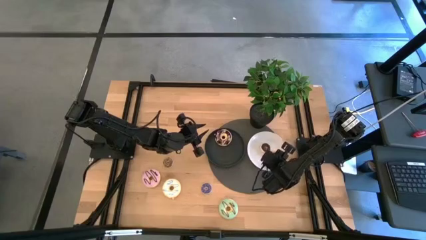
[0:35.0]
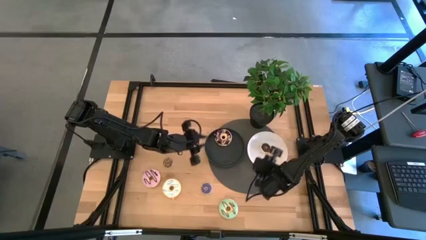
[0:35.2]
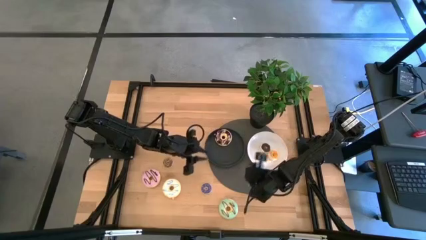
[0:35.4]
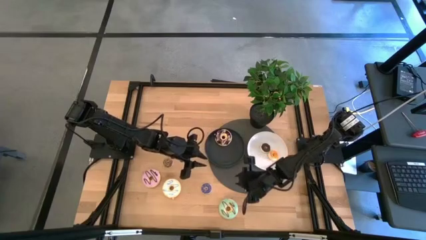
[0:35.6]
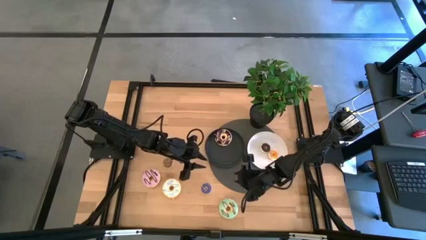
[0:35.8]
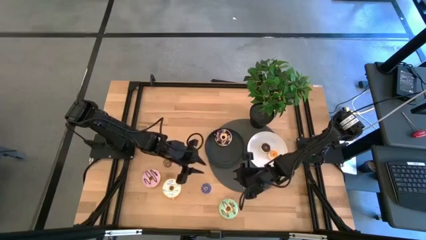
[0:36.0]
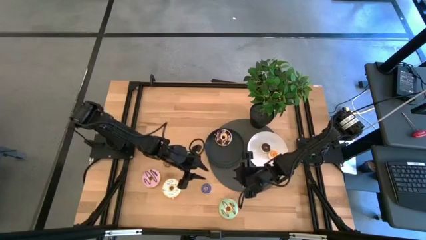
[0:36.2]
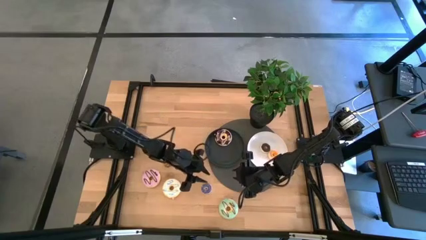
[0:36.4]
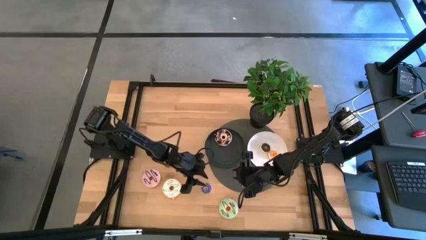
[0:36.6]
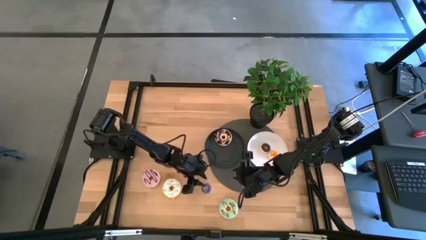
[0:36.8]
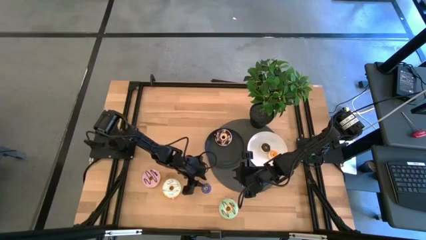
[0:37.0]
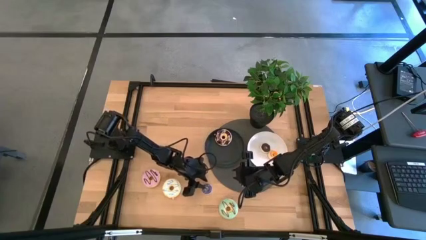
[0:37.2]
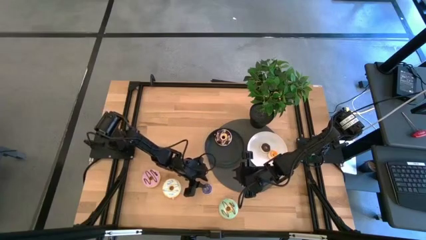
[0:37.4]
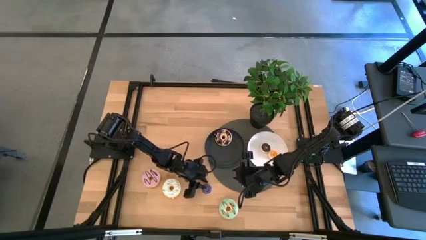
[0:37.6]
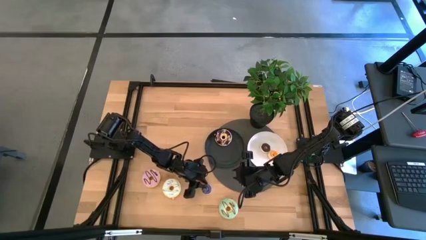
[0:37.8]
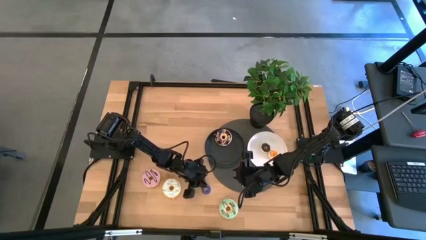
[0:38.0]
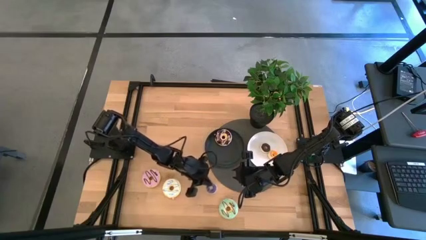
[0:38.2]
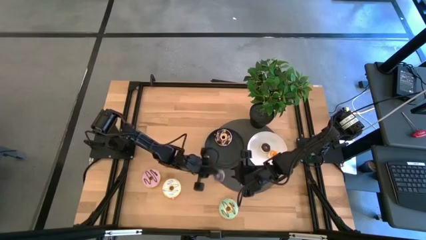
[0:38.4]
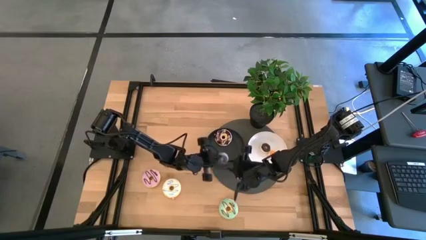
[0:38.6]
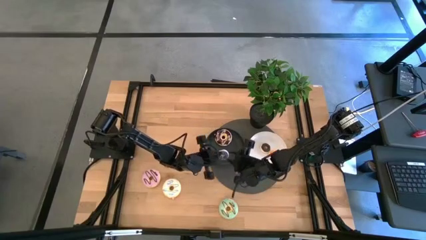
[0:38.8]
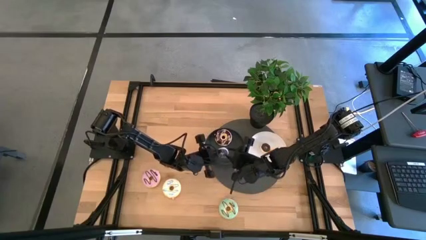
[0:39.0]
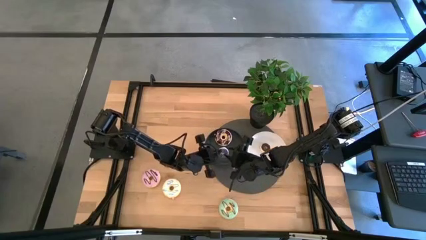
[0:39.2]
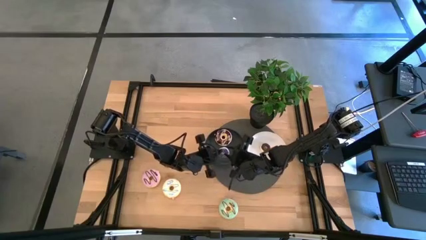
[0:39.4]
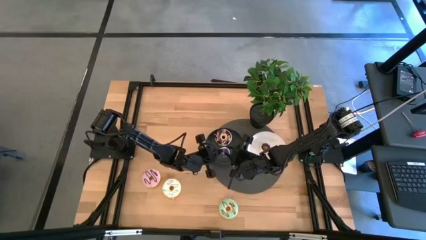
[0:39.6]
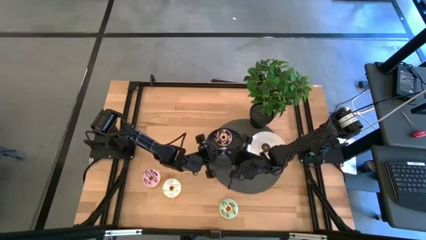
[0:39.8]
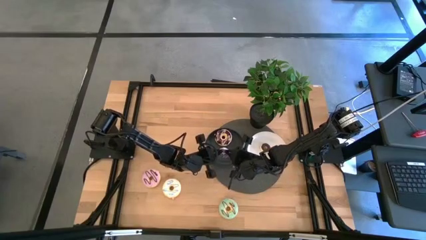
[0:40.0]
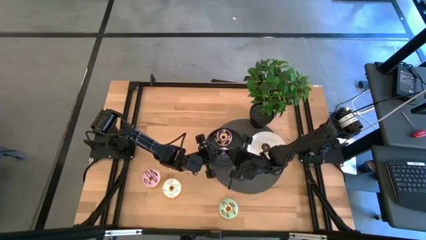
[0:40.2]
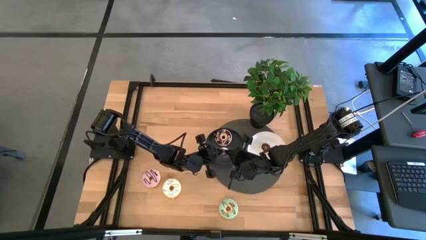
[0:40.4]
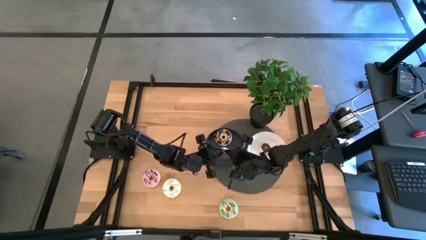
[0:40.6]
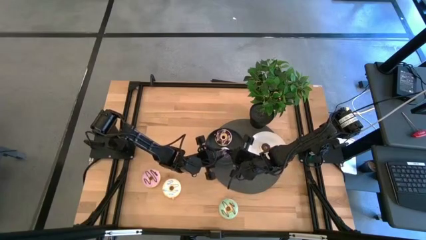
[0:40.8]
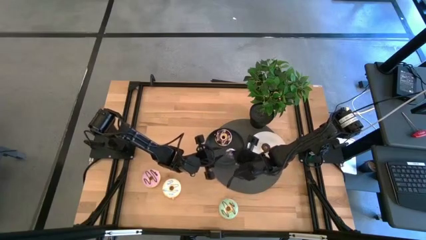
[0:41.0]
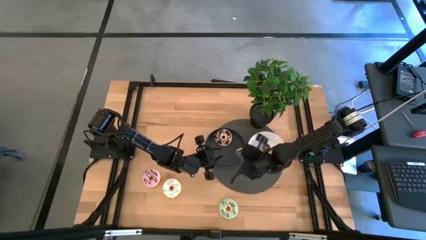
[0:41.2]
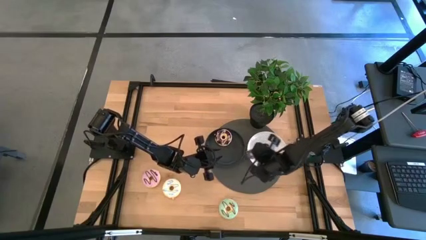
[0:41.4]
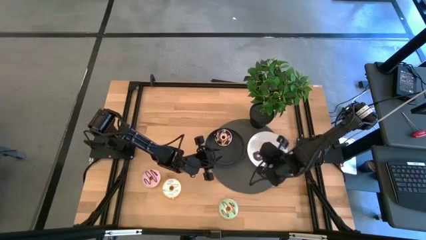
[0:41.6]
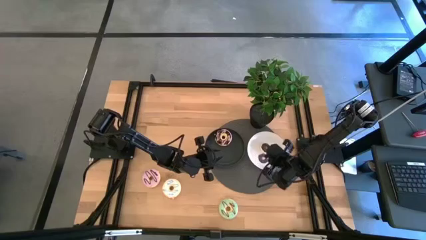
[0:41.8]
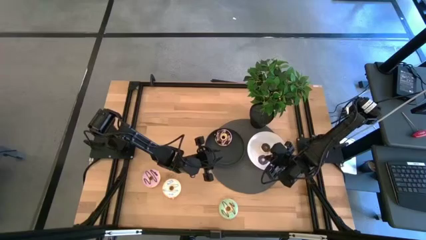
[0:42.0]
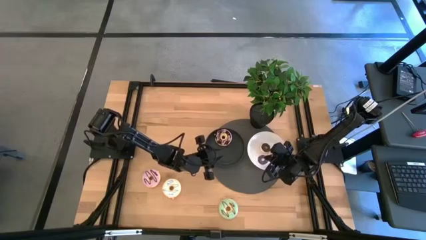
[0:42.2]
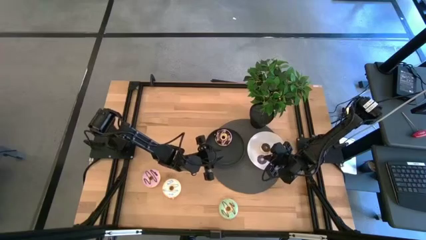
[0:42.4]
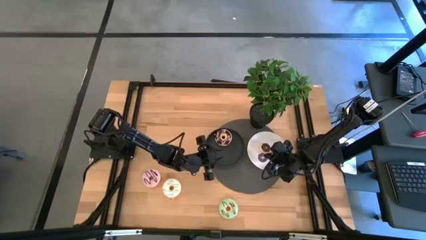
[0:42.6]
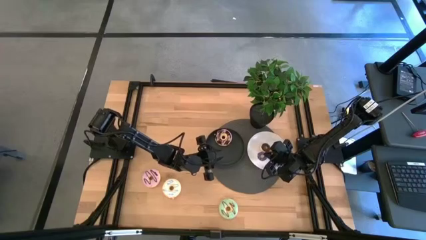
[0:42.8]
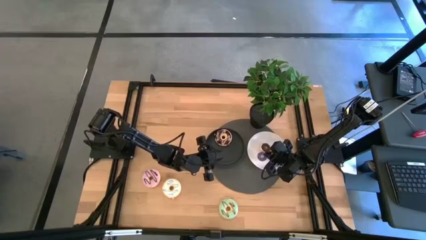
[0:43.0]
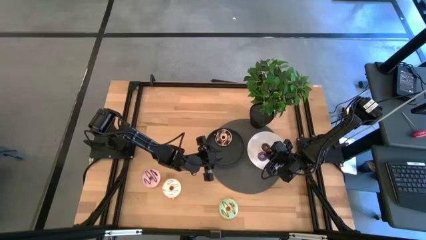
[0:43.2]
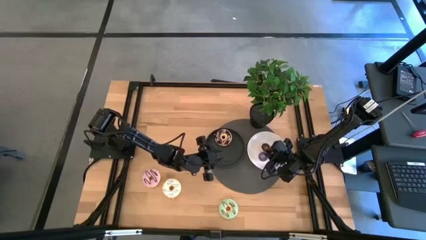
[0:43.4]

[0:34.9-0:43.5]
Task: Pick & Place donuts
Put the small violet donut on the white plate

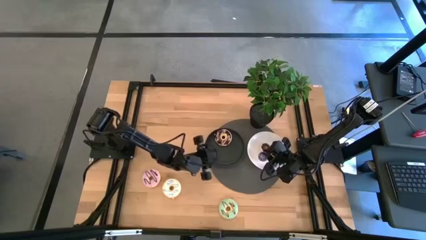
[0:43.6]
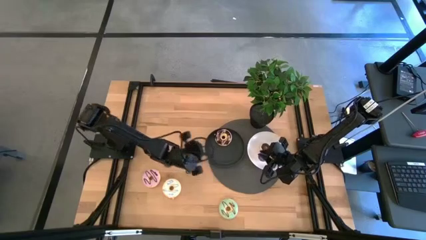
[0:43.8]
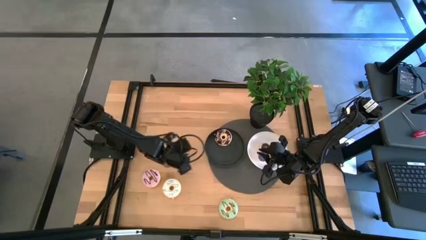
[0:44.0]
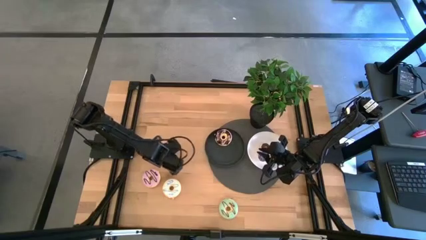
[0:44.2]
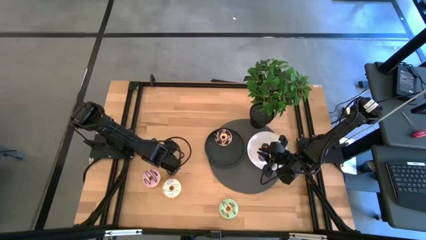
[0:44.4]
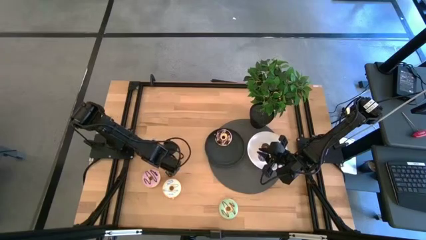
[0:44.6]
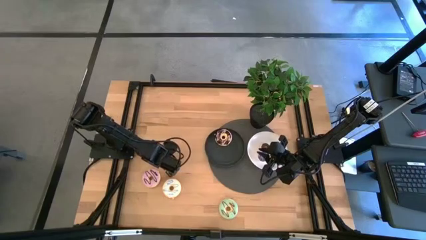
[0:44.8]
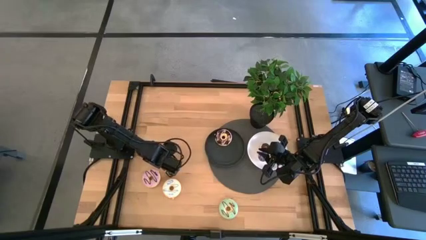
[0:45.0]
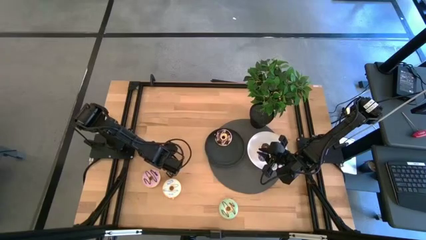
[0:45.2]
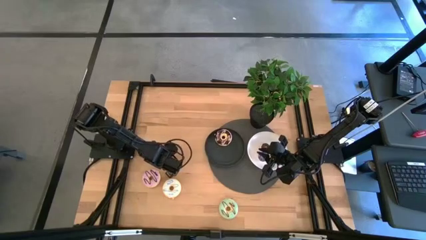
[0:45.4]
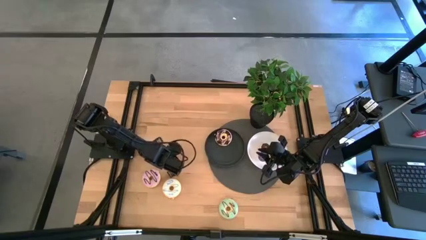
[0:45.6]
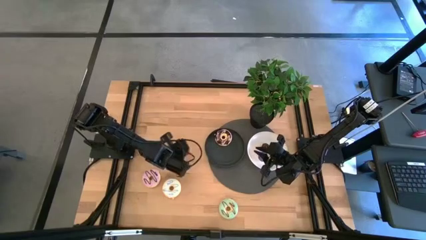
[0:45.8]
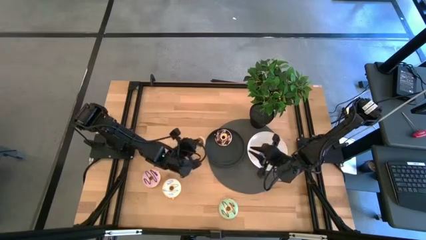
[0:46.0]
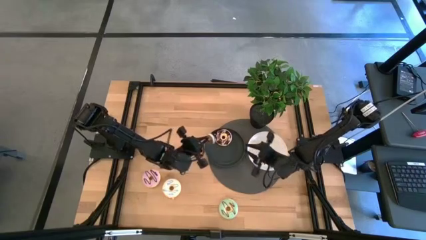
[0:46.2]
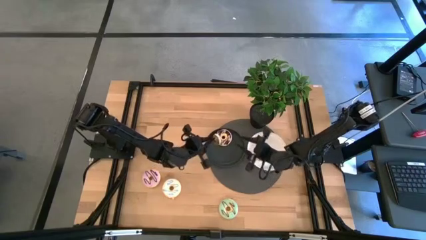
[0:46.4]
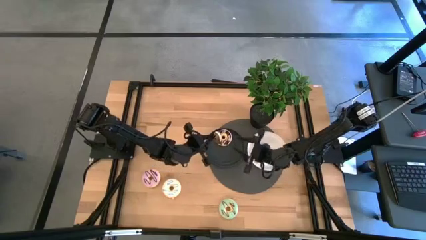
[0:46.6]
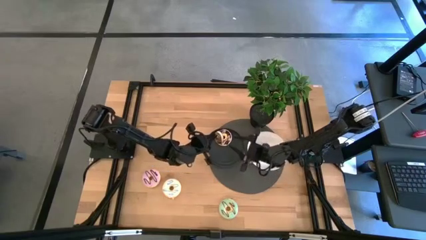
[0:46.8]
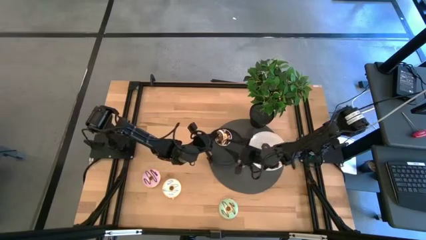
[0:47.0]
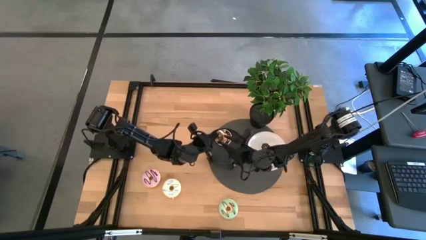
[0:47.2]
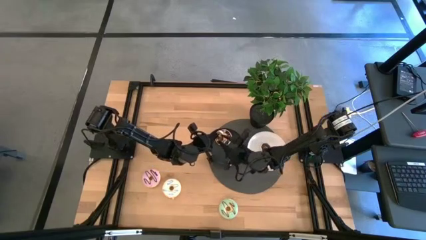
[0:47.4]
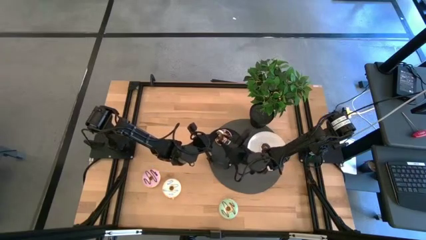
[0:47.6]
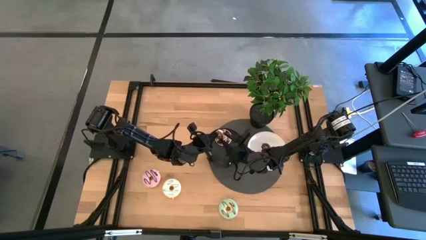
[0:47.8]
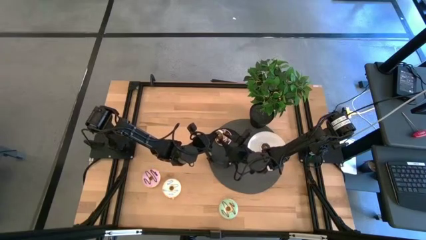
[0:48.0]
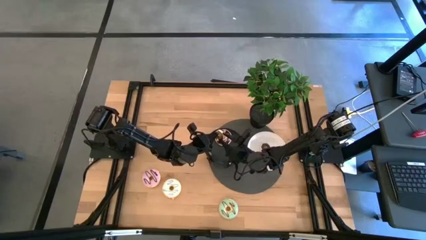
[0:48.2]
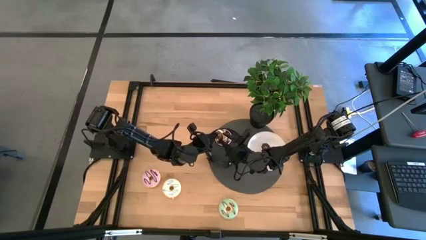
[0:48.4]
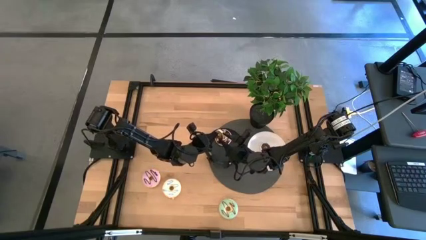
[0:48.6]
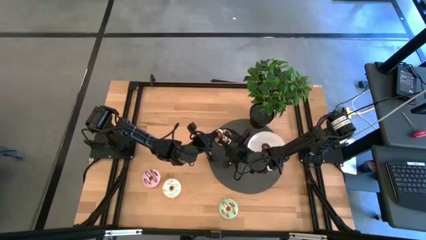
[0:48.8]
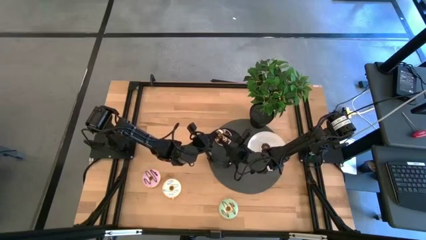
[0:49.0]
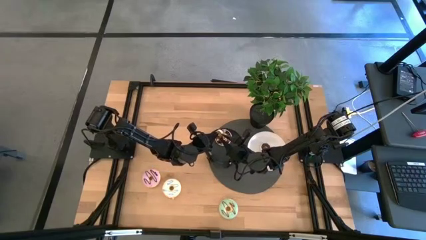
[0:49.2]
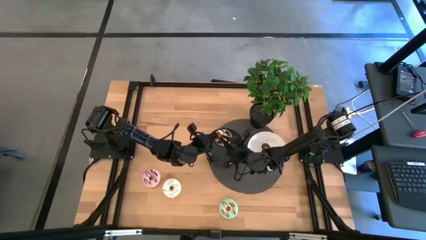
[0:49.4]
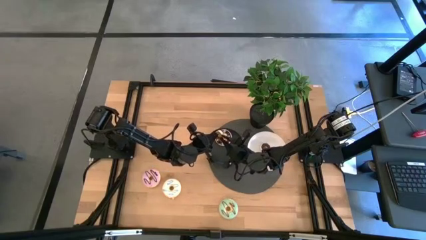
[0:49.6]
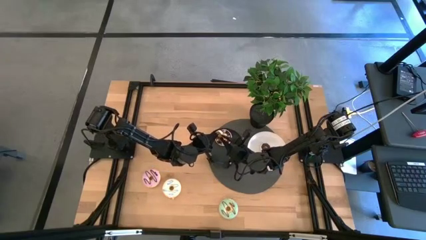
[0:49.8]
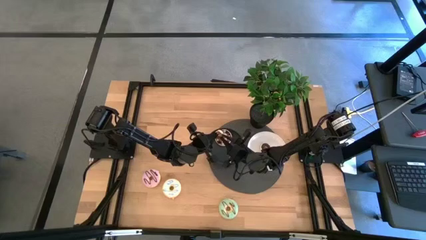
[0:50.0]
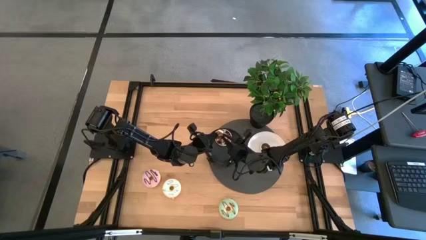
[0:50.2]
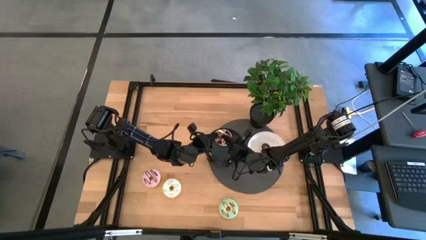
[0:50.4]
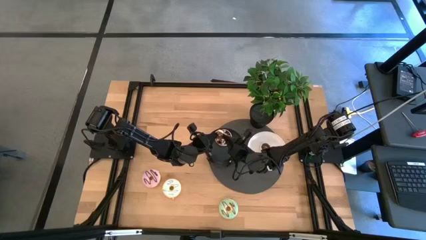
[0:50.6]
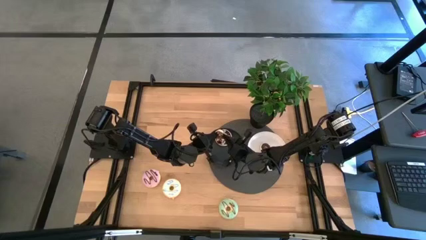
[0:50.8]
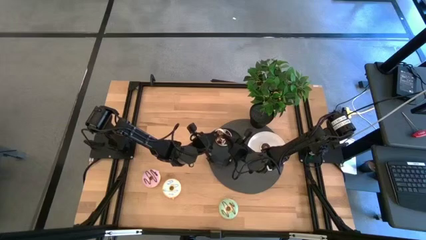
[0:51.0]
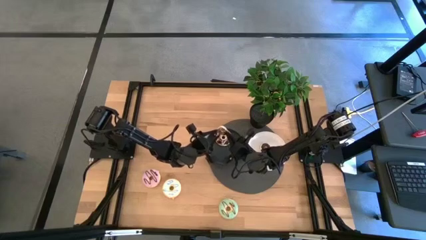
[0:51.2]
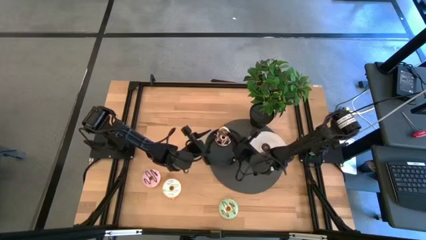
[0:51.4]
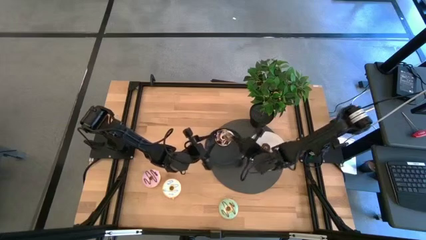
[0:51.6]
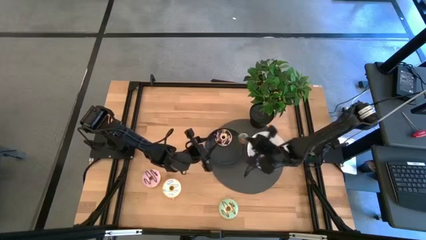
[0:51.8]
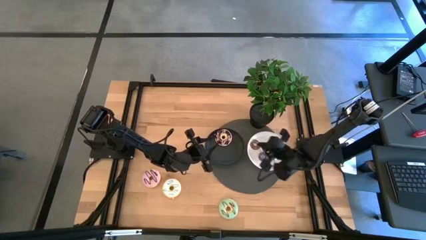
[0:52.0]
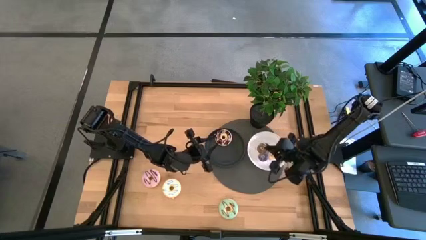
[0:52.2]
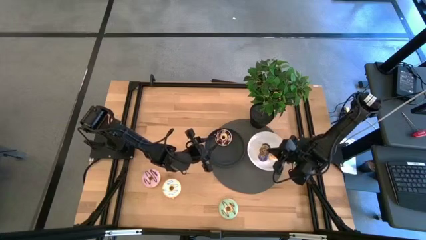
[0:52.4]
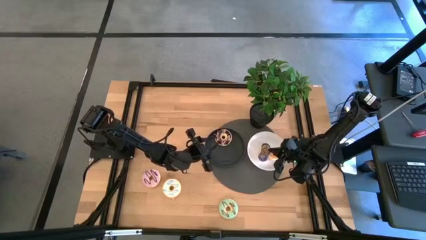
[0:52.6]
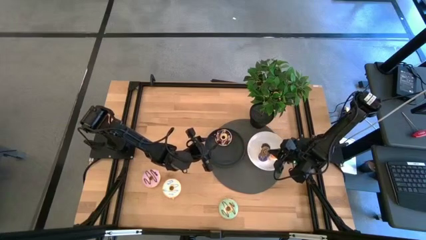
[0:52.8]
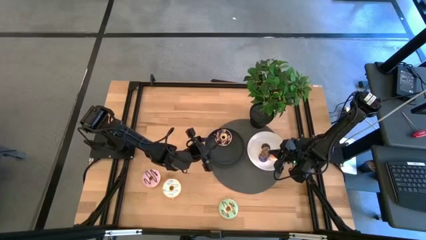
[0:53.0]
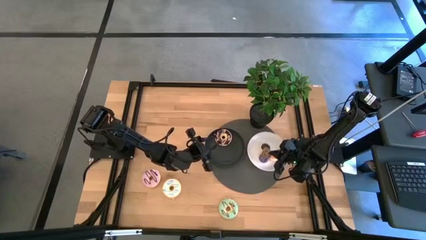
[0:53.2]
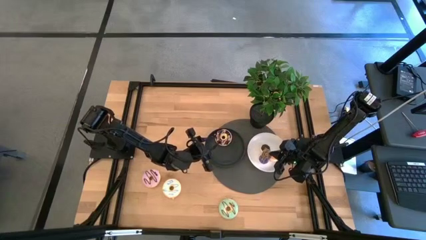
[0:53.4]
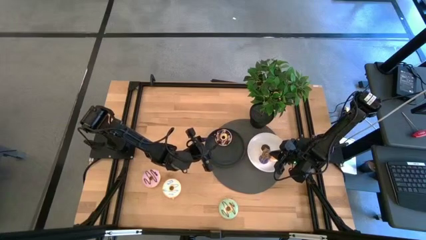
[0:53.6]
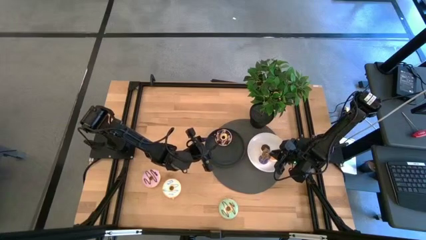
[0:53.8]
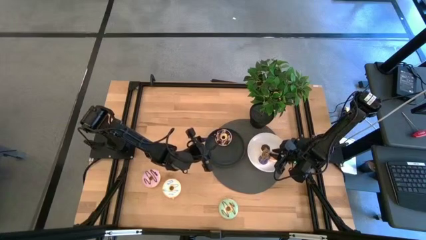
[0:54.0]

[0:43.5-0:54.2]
Put the small brown donut on the white plate
